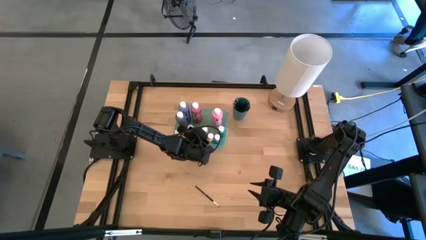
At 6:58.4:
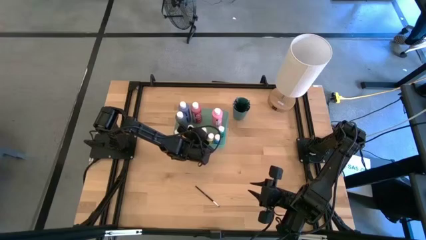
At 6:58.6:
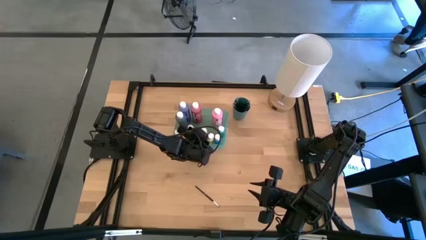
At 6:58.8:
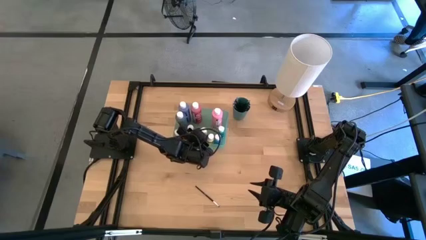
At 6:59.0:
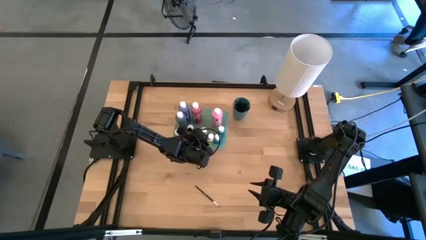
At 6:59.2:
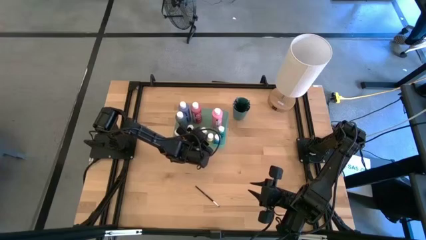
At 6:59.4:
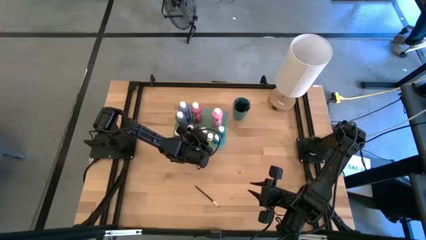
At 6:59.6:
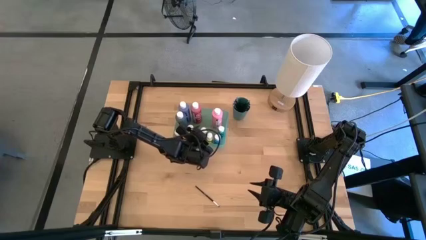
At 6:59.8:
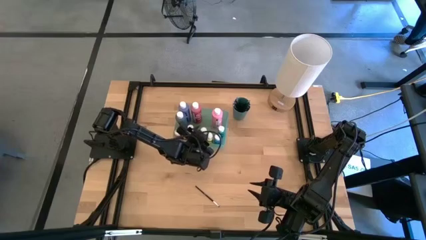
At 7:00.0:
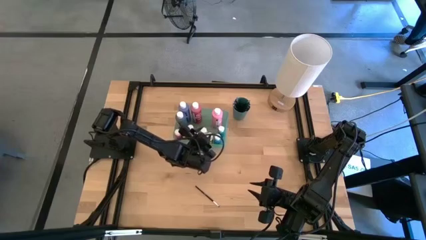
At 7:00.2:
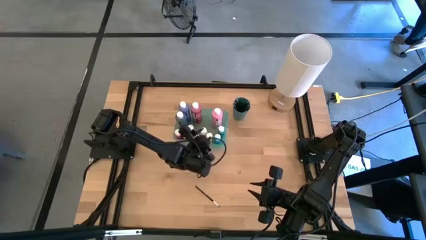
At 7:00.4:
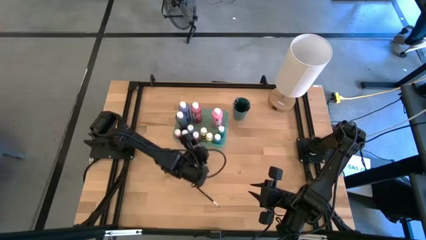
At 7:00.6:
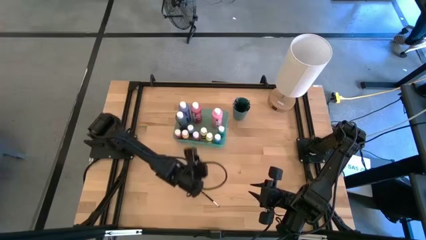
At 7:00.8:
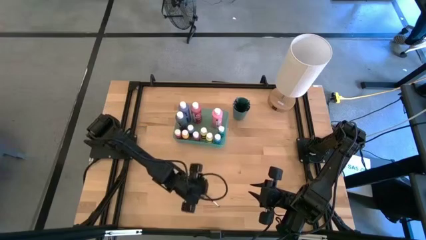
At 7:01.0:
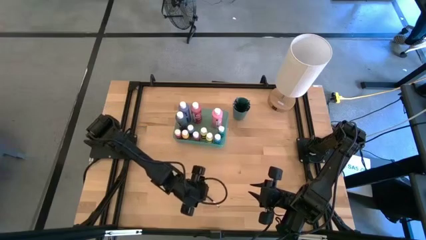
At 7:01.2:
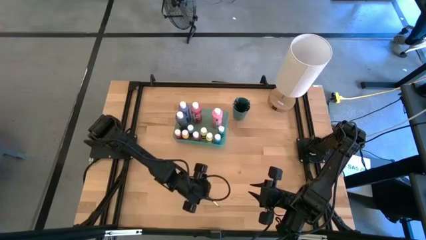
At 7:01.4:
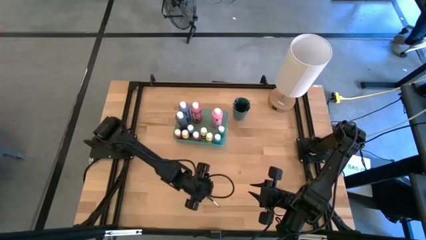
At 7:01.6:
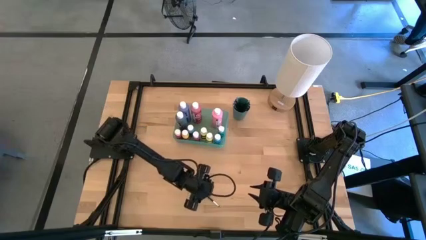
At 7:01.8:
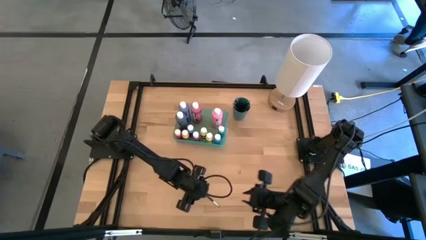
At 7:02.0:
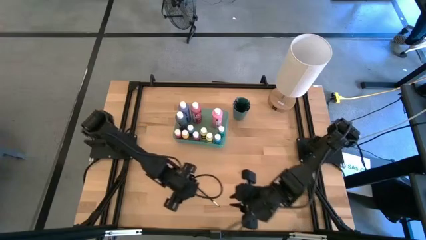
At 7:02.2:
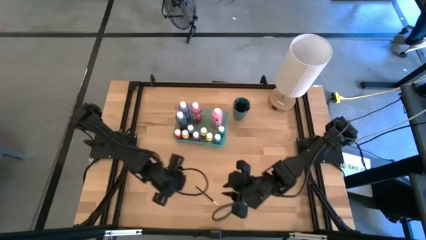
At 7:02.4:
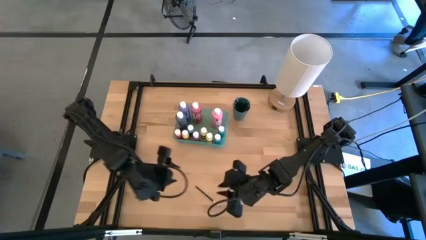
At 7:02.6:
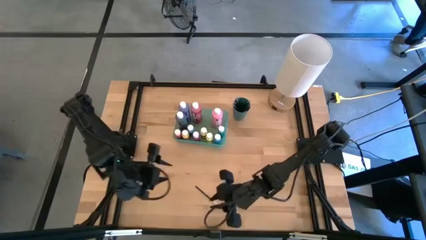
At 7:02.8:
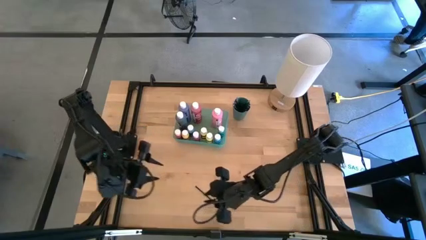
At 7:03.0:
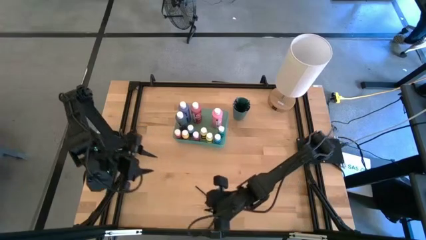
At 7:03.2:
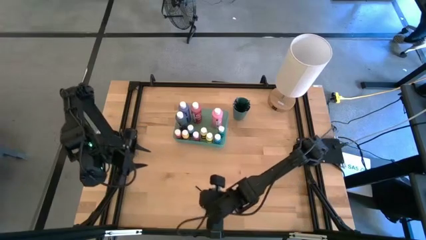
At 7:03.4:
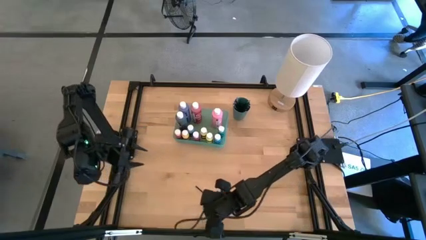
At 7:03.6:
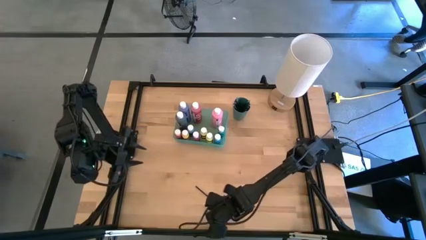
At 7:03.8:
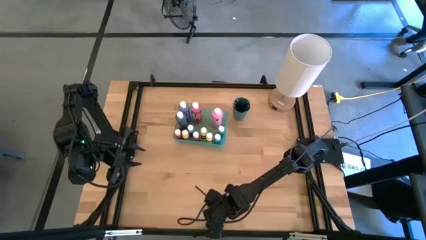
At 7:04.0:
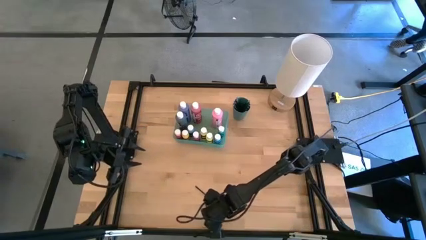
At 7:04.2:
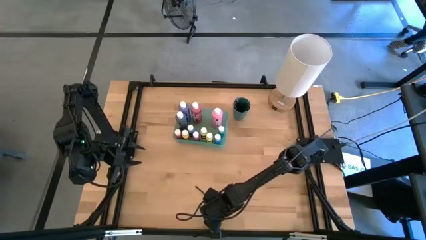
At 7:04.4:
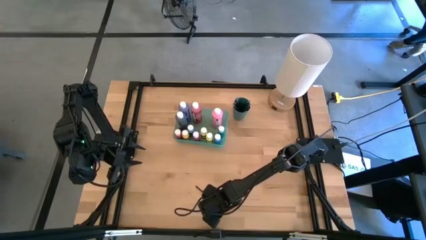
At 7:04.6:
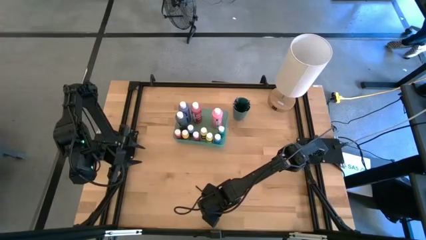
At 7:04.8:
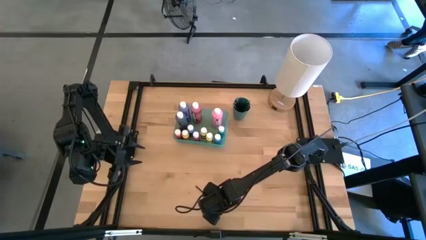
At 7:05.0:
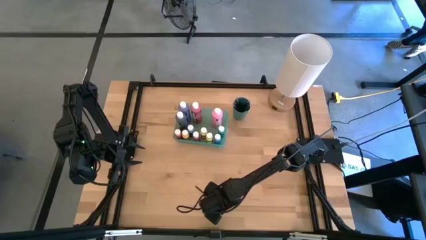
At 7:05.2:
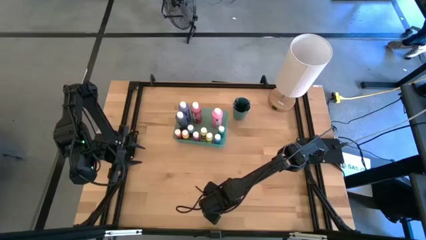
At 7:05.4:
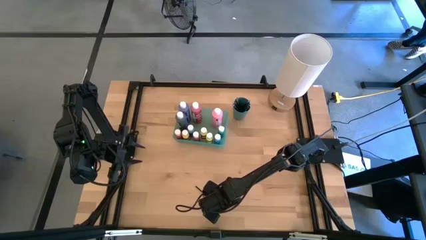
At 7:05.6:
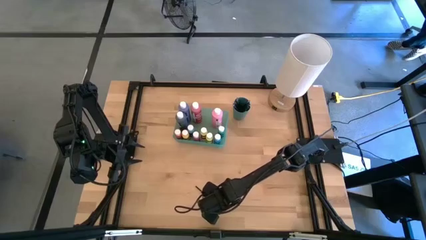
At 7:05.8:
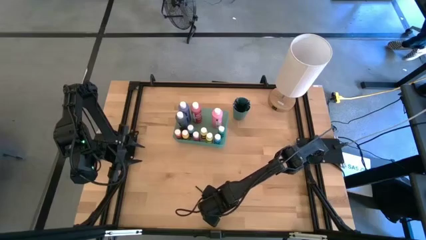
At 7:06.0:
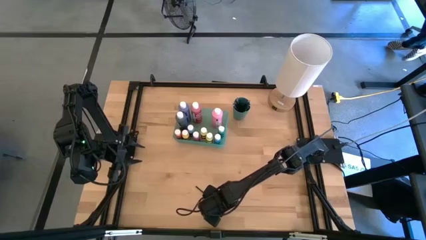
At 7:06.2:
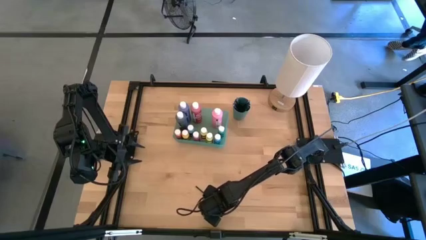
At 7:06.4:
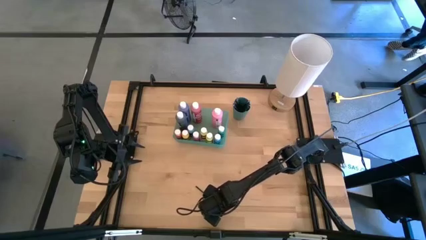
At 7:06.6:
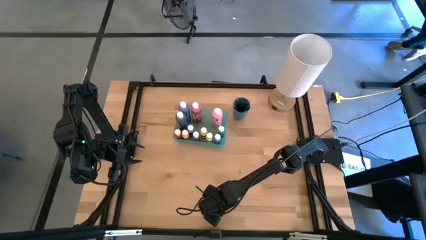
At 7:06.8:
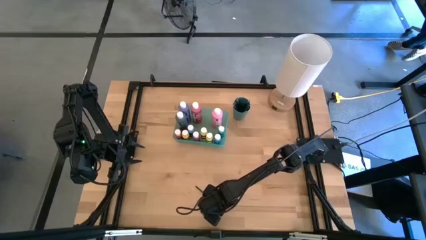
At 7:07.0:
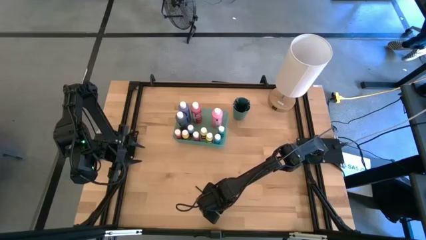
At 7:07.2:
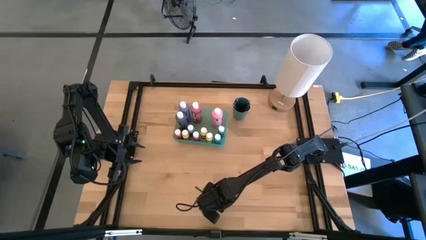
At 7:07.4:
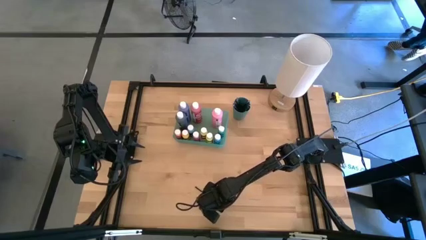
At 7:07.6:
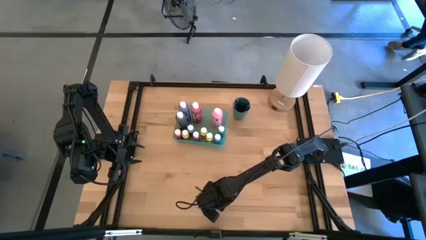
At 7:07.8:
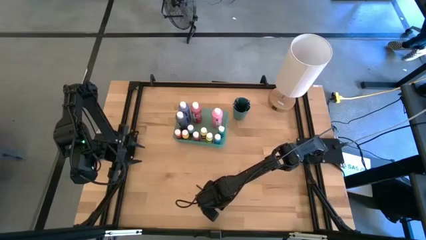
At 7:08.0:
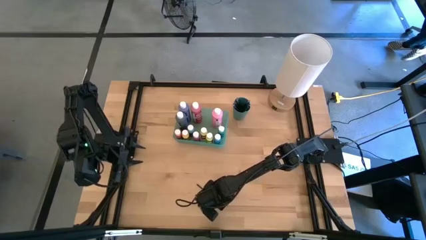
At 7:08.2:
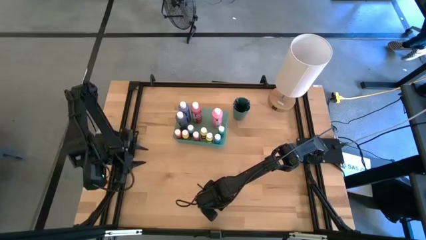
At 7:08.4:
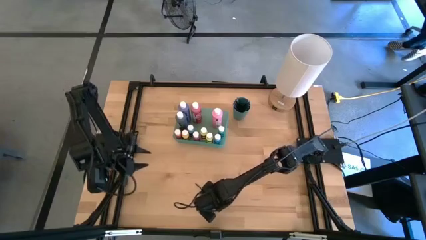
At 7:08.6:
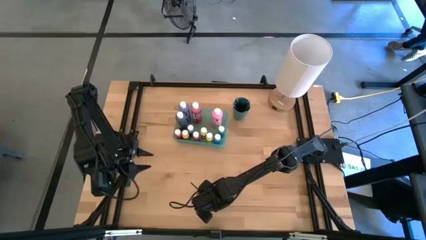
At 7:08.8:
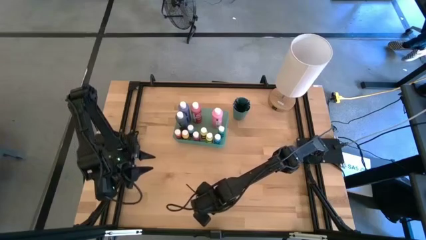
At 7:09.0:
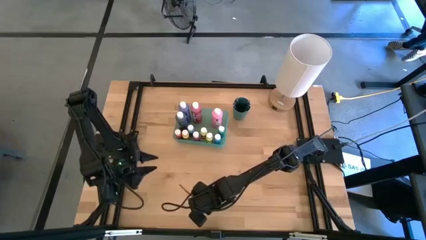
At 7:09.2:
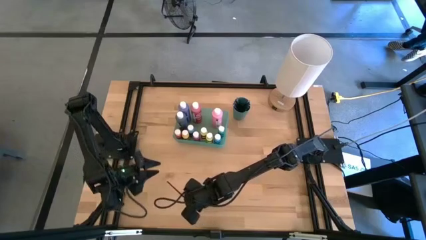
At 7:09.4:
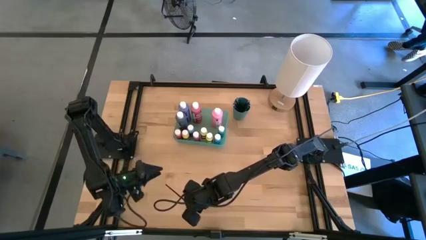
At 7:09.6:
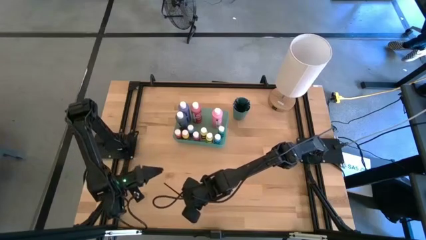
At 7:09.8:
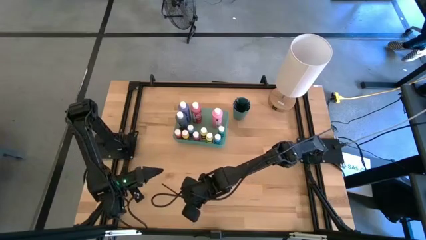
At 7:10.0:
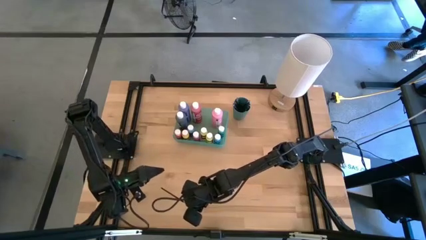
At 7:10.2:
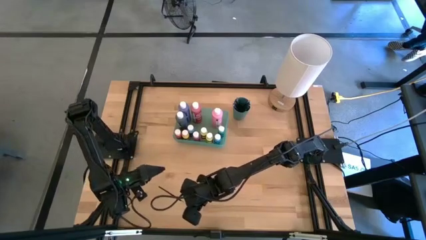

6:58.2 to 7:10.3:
Task: Pick & Place Paint Supplies
Put the black paint brush into the dark green cup
